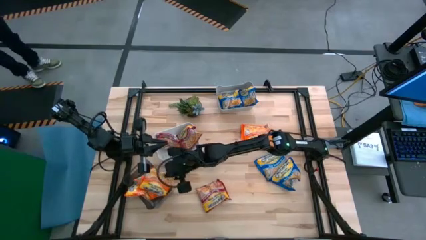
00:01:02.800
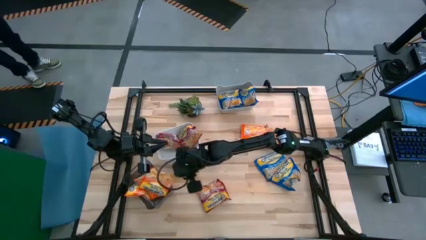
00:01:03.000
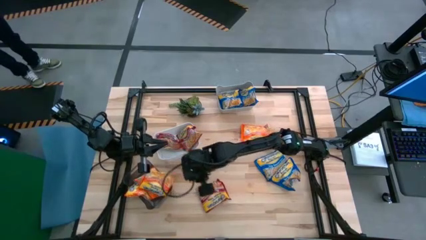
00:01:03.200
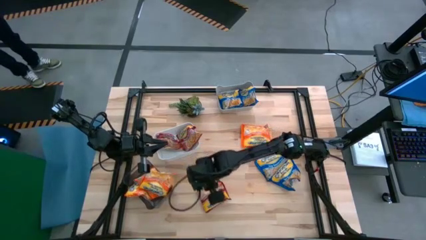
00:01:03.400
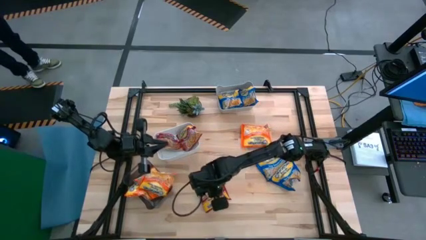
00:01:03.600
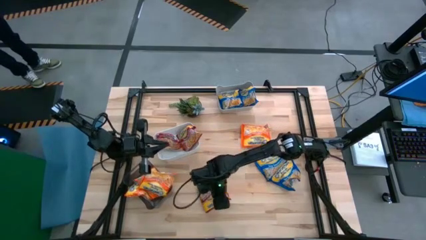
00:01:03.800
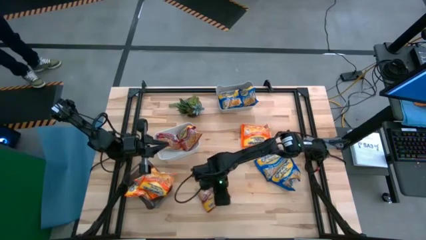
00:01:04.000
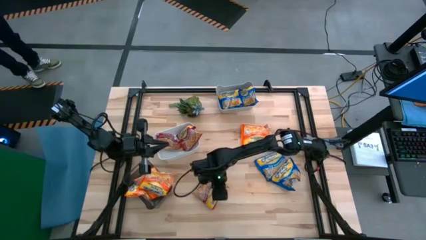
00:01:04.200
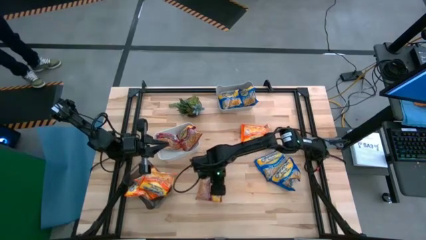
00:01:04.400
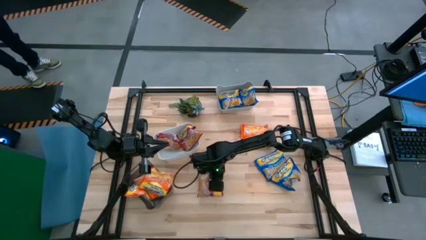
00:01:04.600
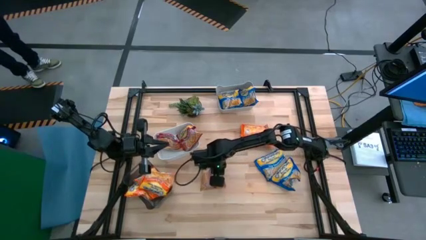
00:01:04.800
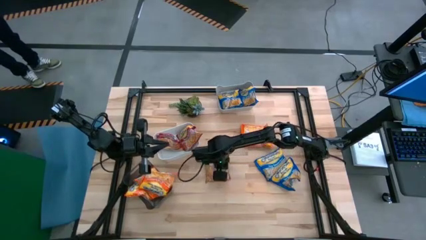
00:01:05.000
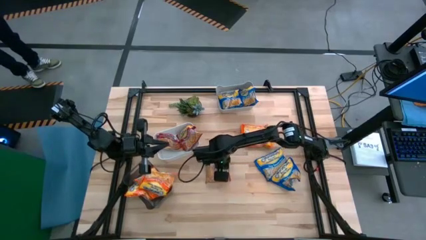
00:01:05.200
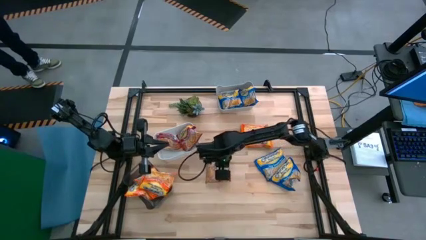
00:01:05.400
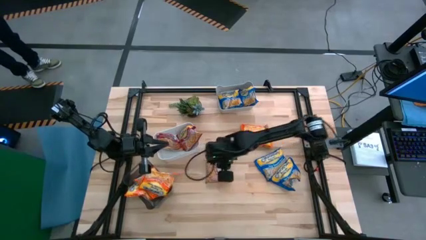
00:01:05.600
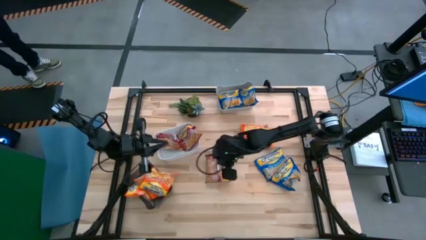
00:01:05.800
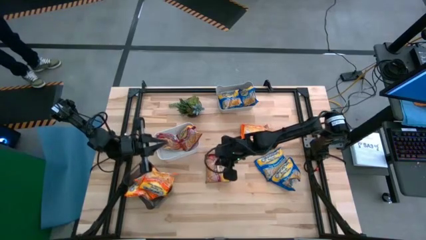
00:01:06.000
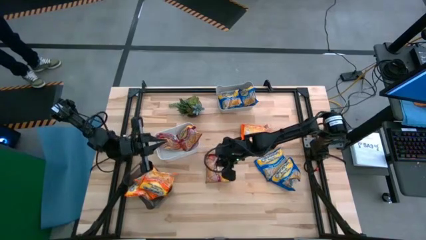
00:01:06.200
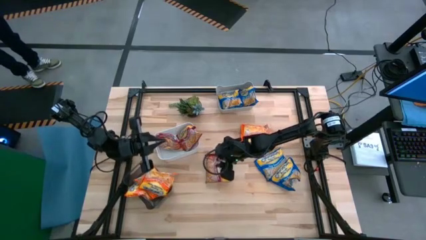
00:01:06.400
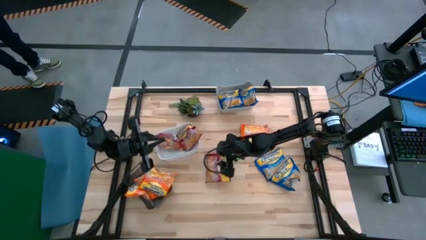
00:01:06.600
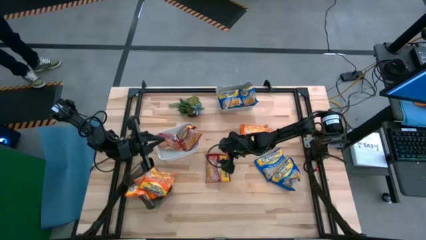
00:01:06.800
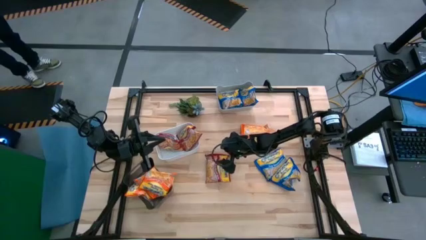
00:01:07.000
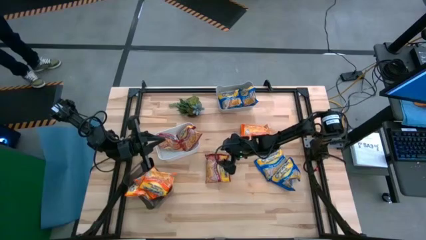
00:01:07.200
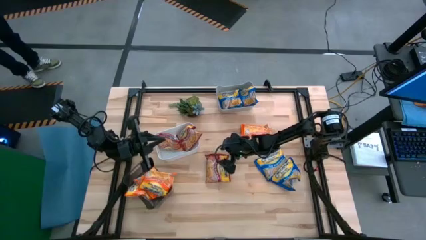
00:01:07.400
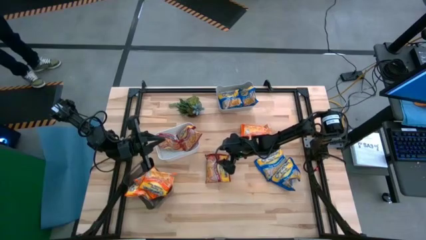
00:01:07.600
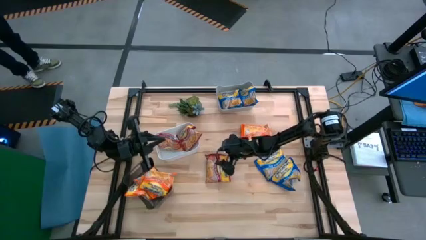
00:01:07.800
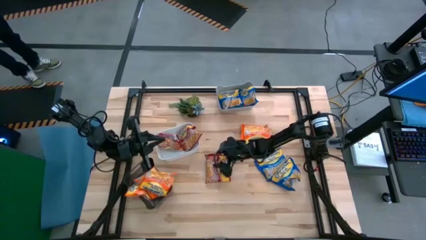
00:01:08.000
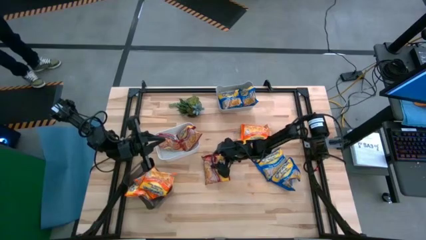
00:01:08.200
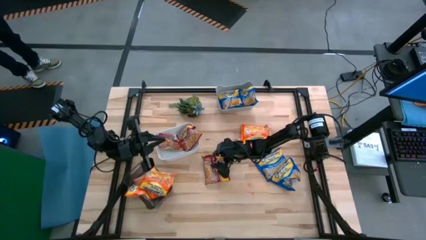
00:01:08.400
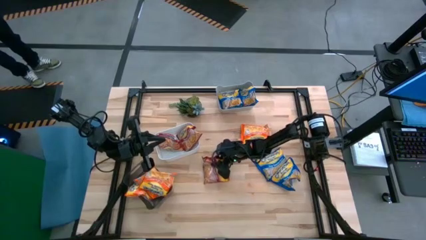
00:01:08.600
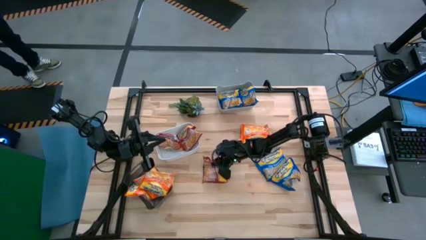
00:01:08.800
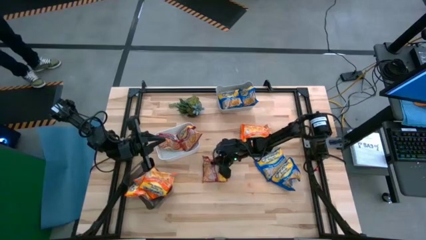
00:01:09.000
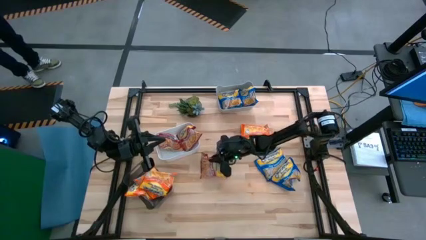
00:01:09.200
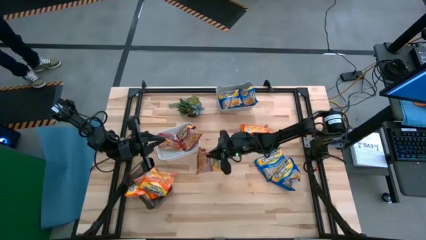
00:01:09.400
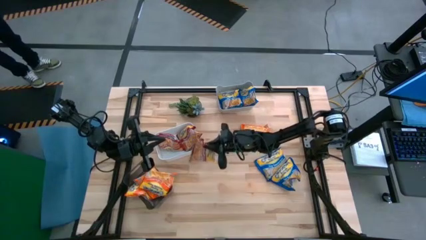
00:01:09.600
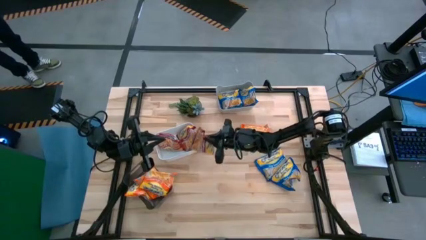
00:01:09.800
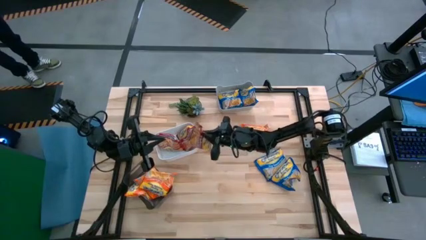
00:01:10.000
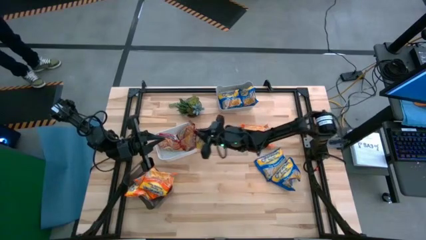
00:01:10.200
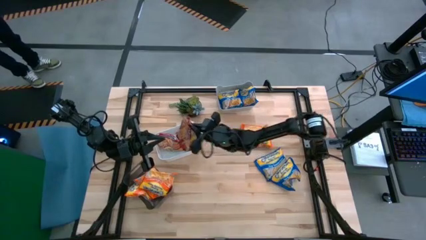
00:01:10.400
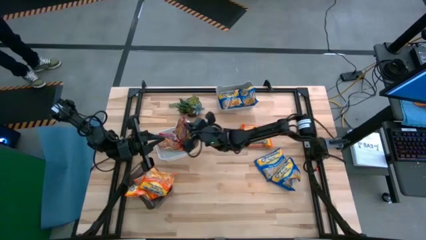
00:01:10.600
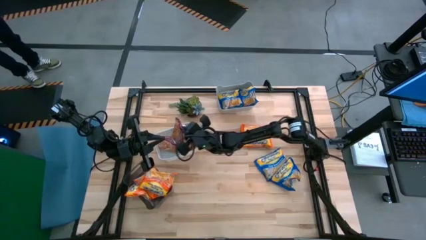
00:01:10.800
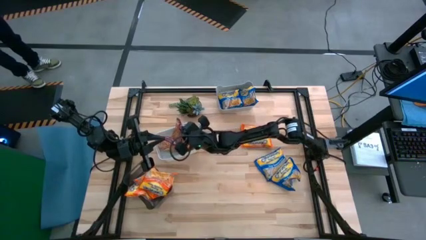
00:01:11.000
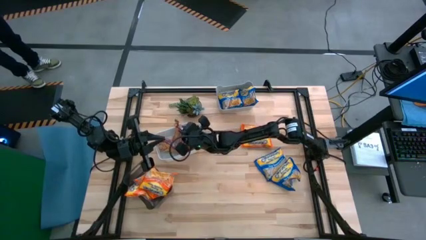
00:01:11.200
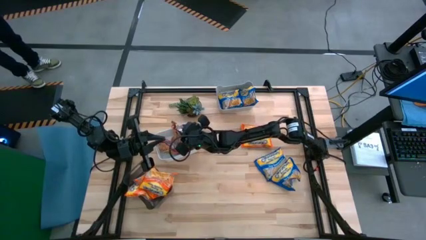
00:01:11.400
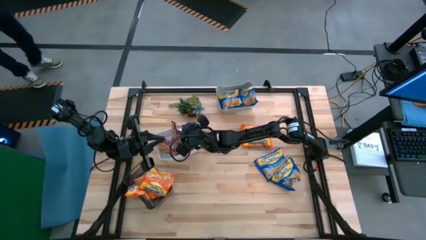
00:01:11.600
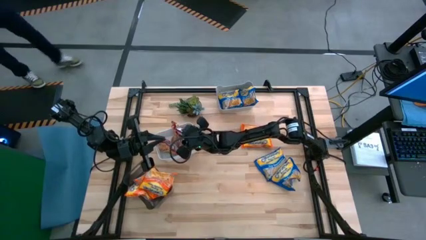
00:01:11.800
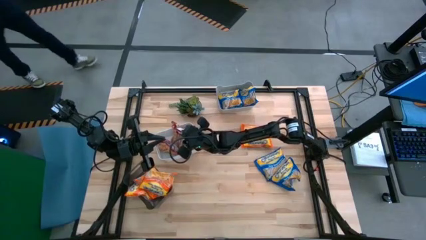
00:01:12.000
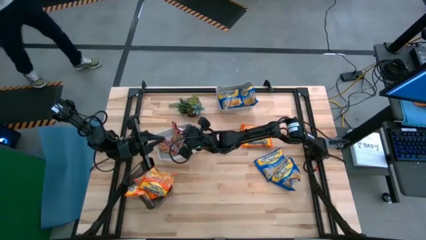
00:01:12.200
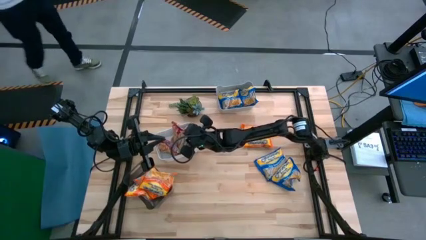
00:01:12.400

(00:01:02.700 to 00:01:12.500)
Task: Sort Maruchan noodles
Put the red noodle pack into the white bin

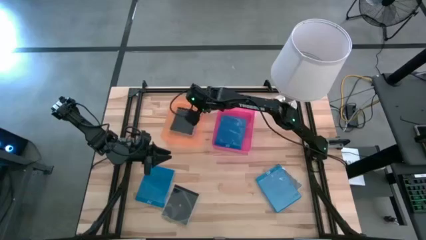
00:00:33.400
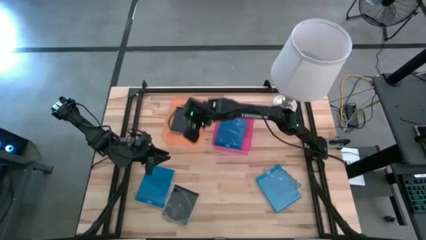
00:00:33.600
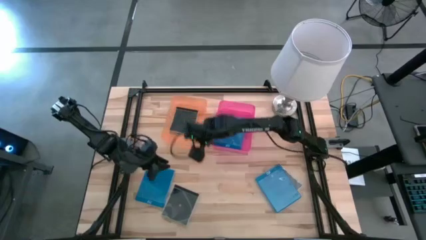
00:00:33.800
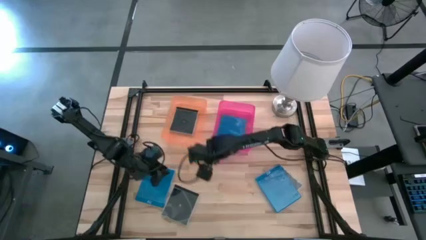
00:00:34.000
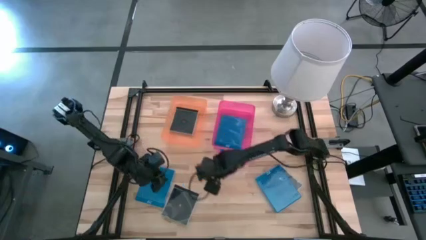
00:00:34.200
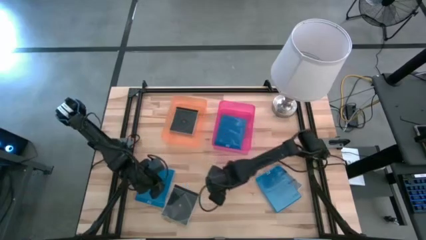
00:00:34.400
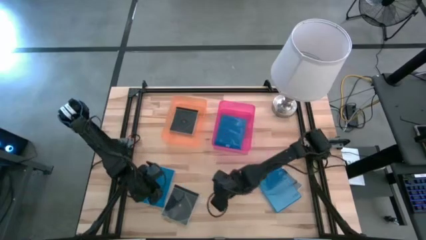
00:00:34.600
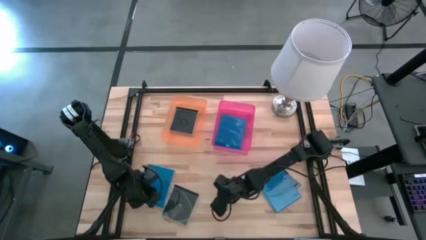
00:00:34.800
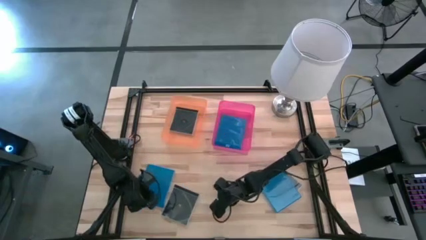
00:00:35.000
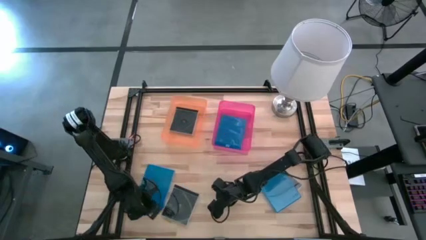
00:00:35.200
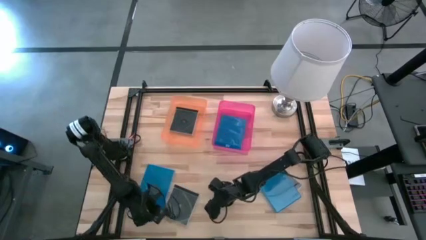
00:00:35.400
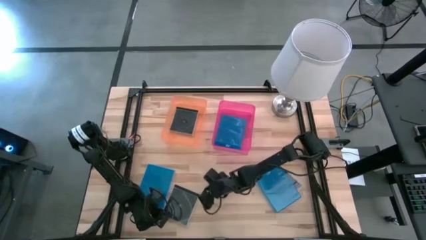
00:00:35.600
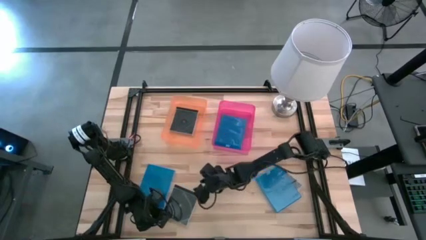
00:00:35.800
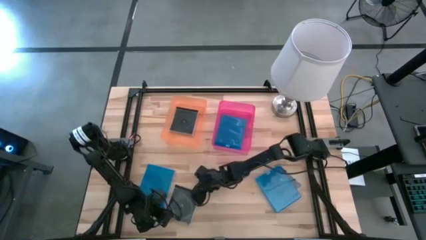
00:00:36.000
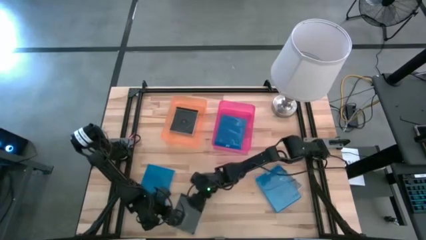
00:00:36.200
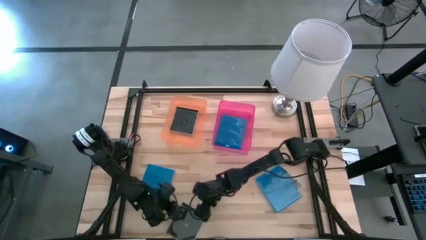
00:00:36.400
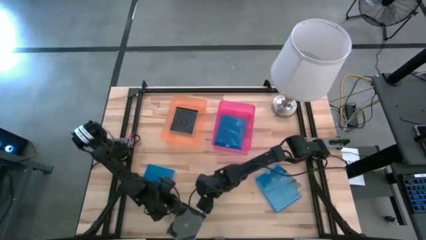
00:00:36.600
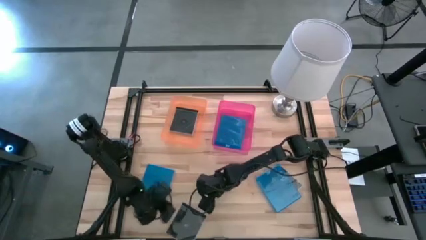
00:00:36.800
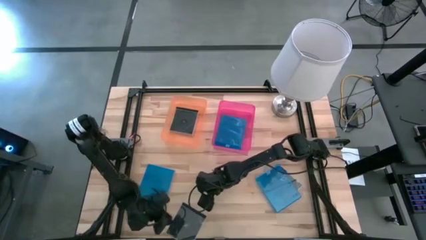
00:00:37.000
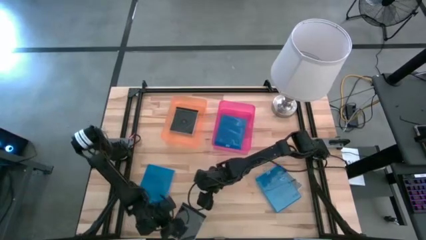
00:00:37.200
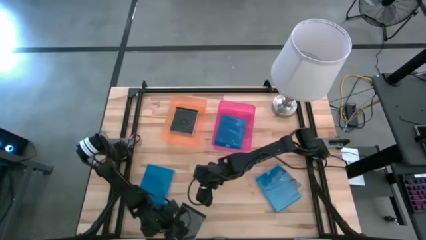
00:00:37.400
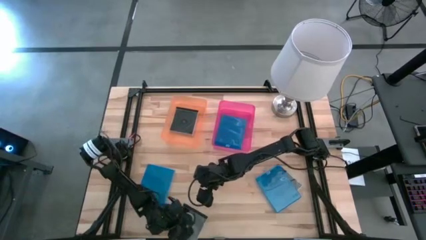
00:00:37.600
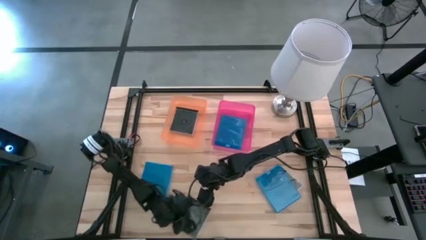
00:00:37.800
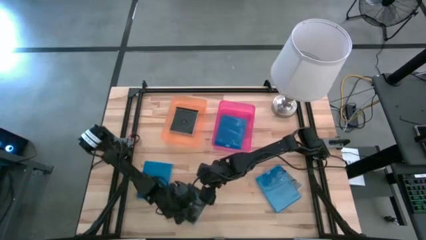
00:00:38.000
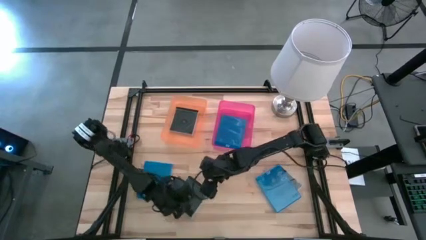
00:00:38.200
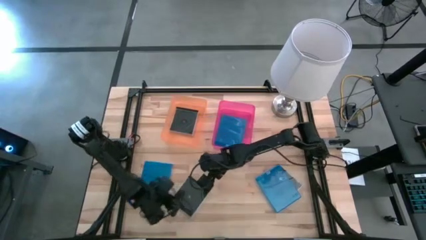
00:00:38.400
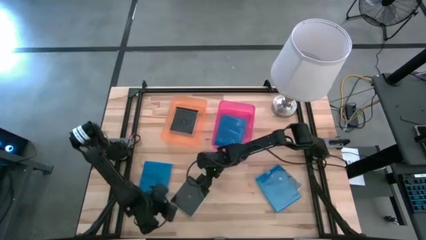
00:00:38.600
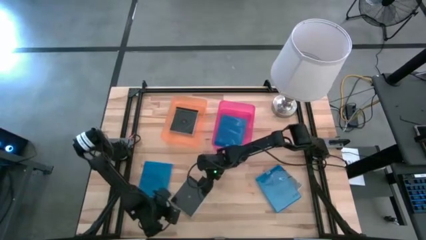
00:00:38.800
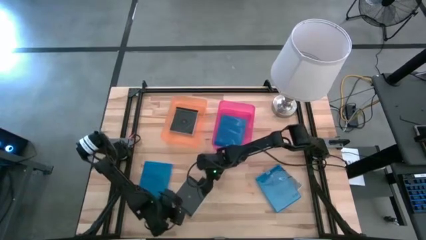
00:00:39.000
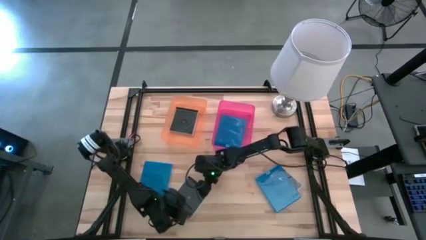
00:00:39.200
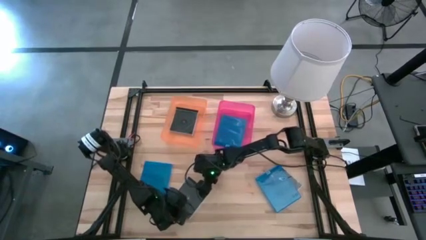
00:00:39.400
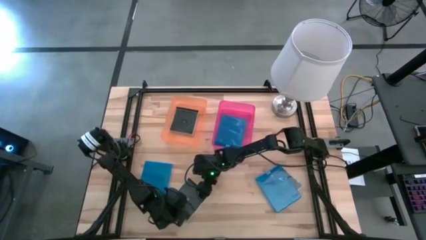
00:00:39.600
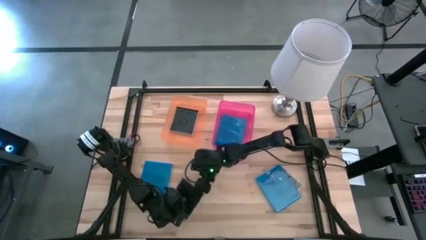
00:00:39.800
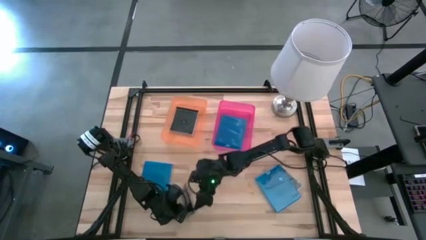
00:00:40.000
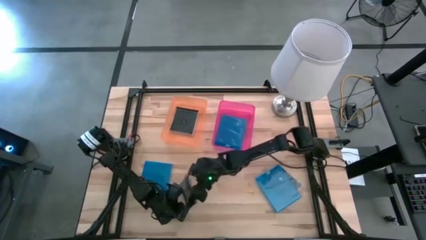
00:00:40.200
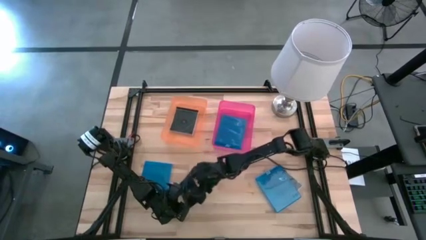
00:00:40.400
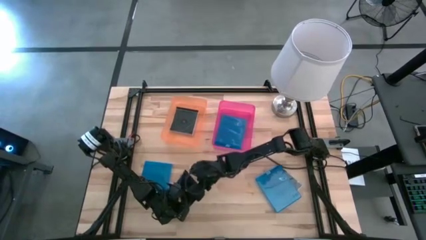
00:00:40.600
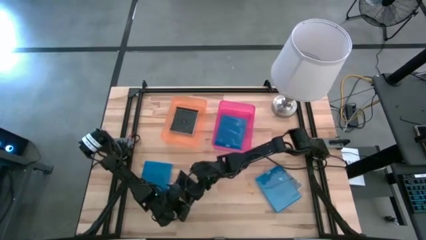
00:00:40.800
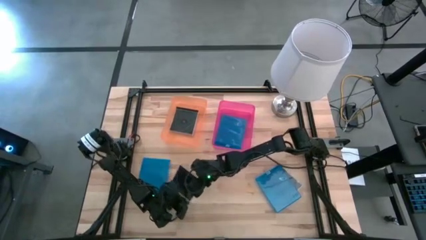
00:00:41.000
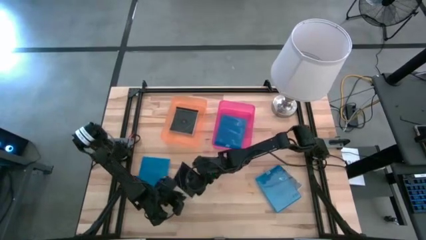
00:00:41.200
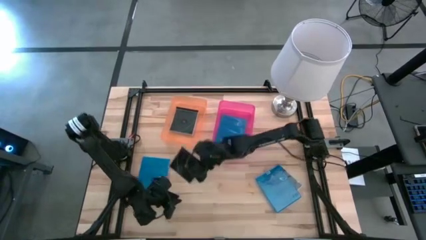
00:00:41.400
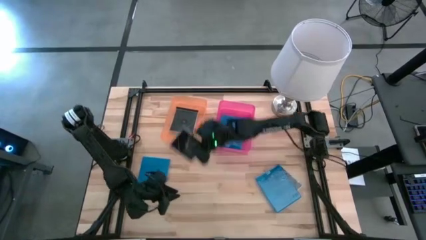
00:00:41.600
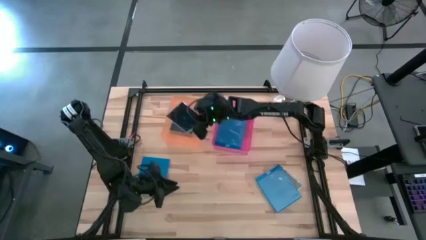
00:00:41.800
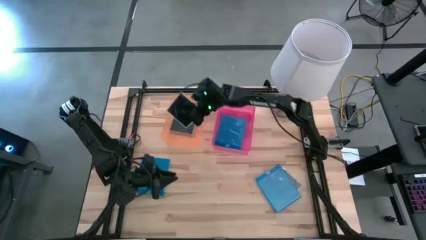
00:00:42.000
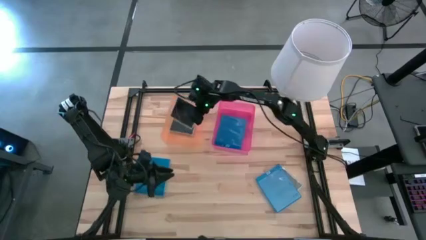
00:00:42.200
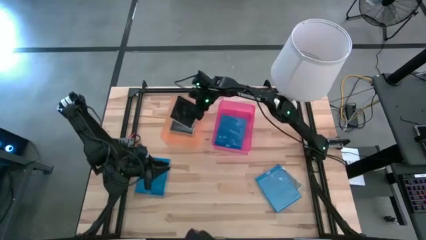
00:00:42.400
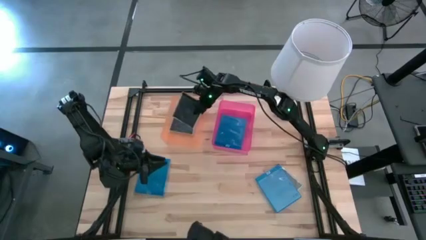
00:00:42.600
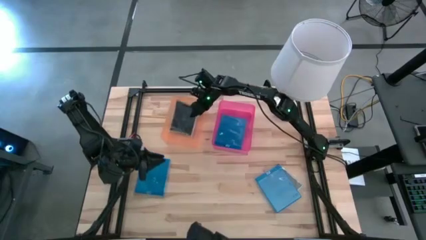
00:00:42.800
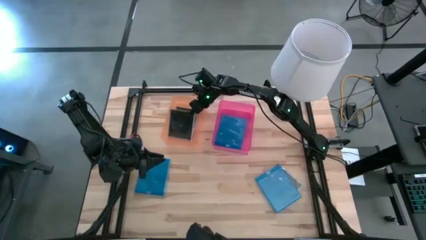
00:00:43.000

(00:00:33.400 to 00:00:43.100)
Task: Pick & place jewel cases by type
Put the left black CD case into the orange bin
